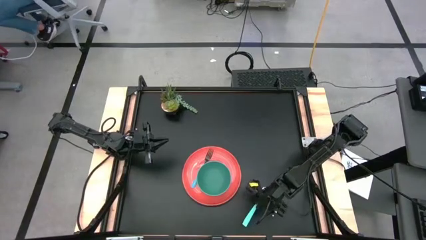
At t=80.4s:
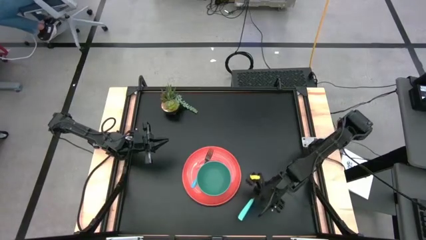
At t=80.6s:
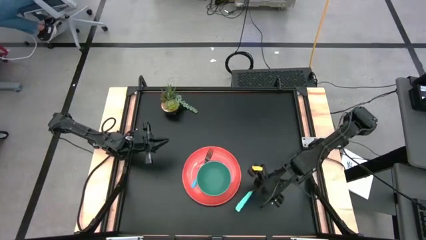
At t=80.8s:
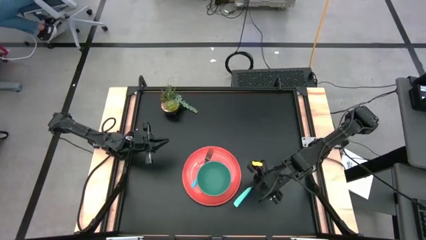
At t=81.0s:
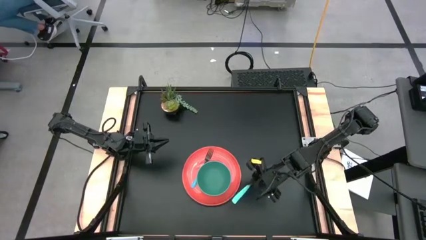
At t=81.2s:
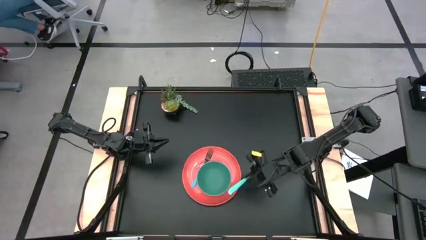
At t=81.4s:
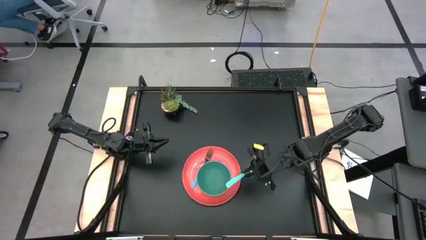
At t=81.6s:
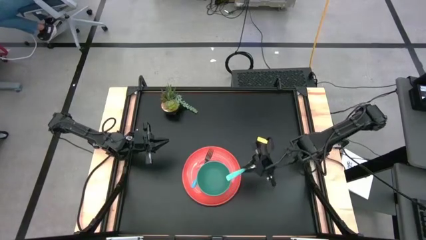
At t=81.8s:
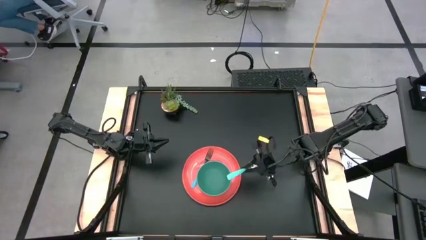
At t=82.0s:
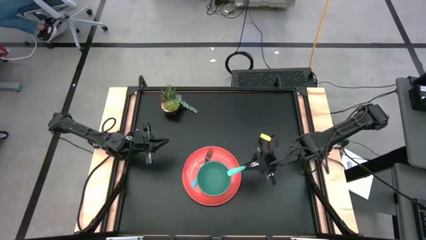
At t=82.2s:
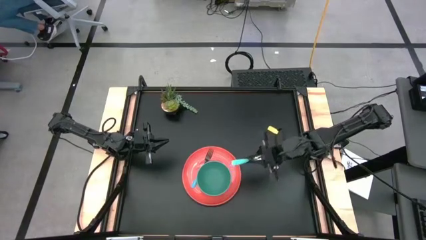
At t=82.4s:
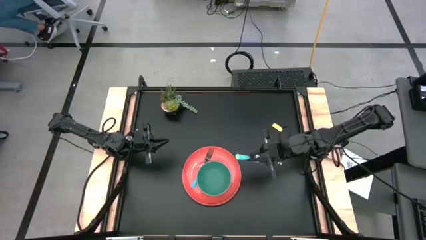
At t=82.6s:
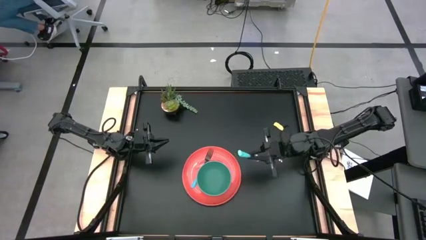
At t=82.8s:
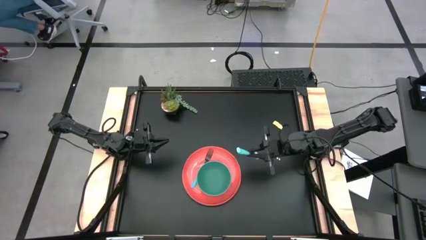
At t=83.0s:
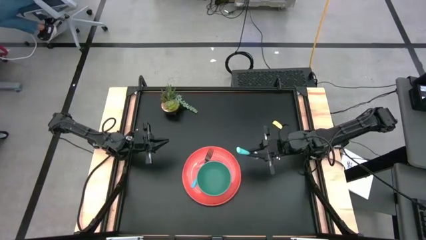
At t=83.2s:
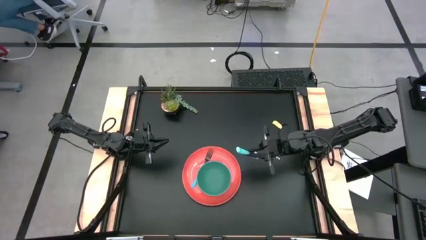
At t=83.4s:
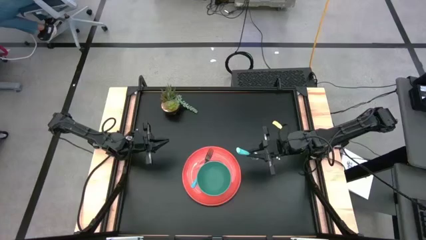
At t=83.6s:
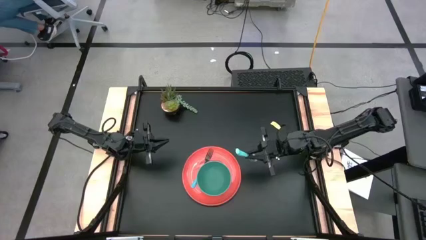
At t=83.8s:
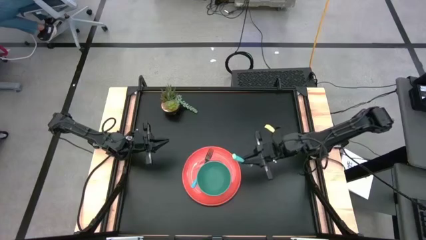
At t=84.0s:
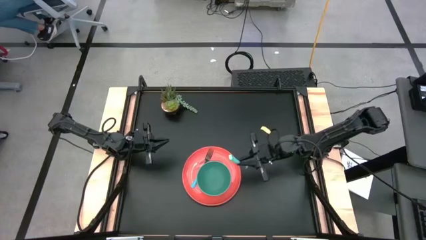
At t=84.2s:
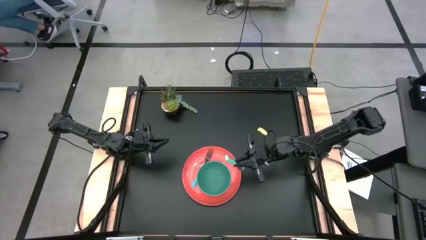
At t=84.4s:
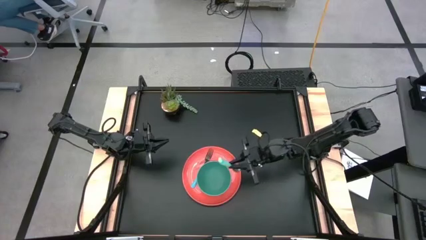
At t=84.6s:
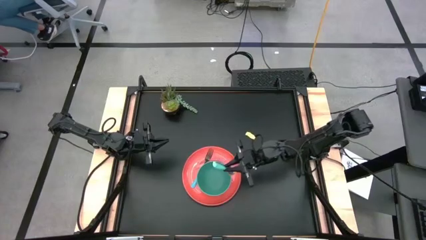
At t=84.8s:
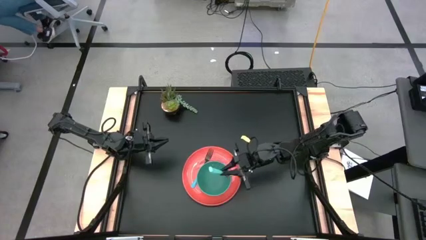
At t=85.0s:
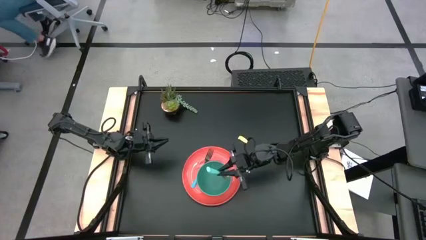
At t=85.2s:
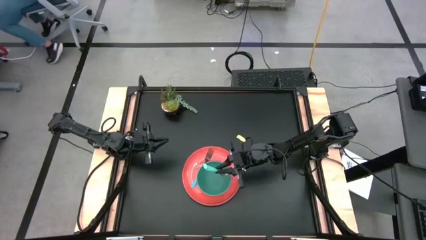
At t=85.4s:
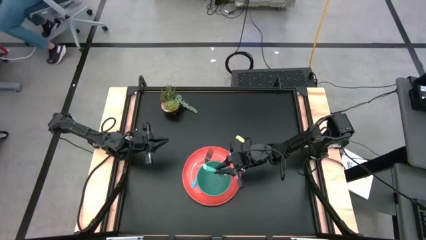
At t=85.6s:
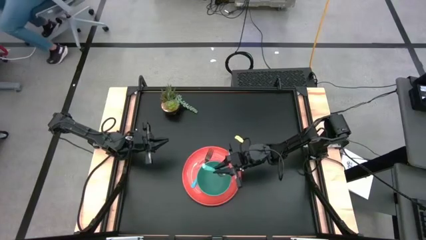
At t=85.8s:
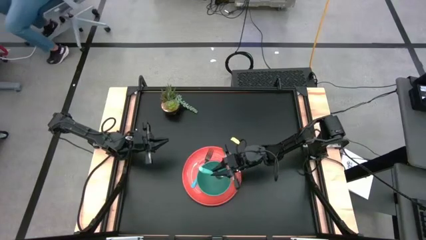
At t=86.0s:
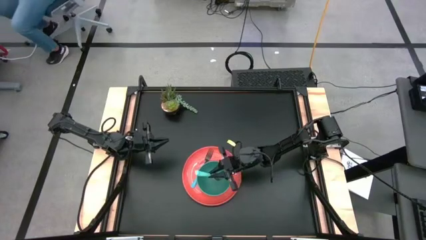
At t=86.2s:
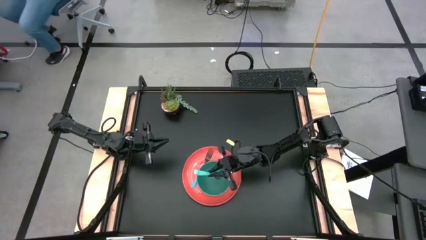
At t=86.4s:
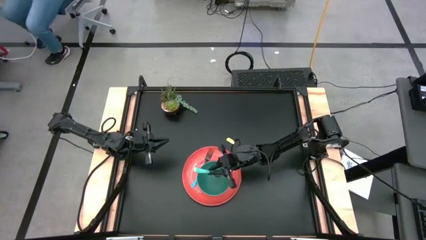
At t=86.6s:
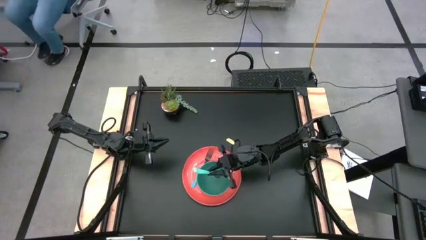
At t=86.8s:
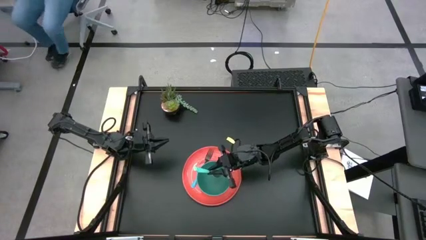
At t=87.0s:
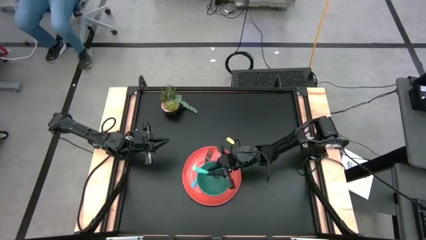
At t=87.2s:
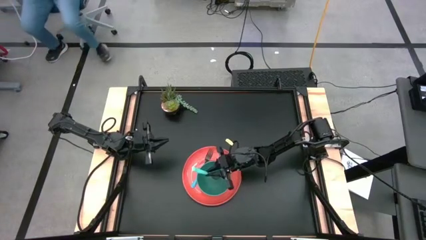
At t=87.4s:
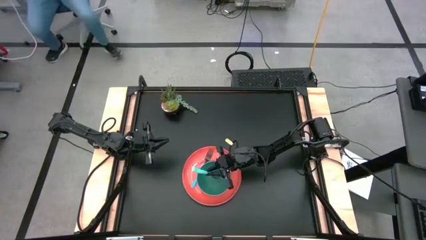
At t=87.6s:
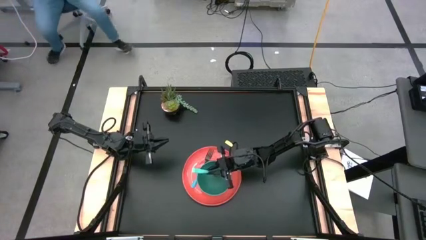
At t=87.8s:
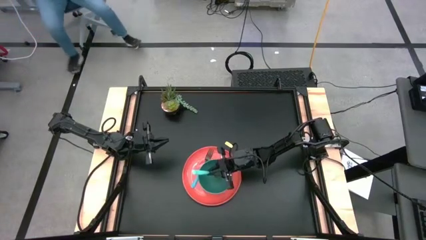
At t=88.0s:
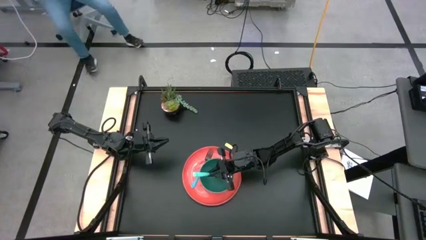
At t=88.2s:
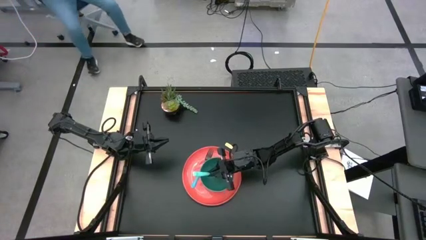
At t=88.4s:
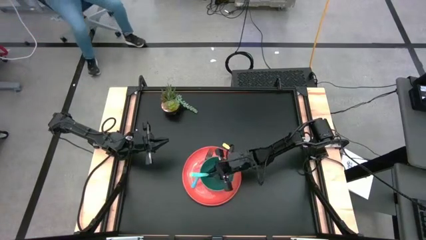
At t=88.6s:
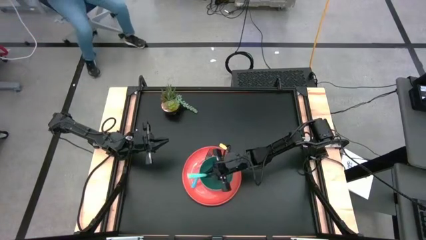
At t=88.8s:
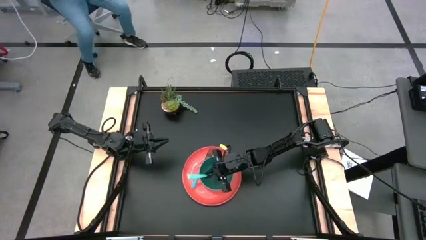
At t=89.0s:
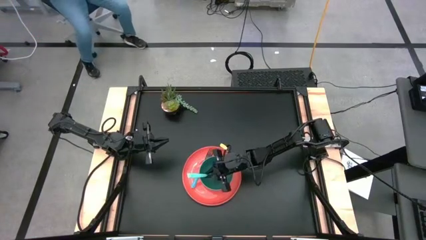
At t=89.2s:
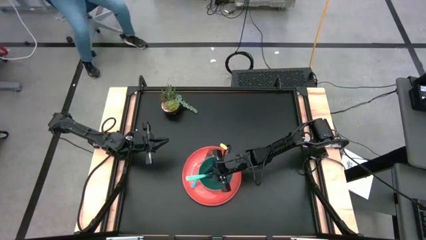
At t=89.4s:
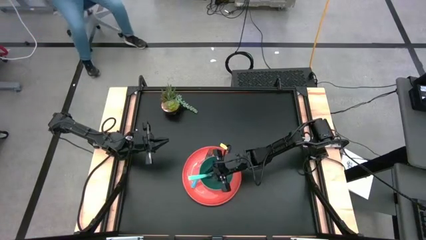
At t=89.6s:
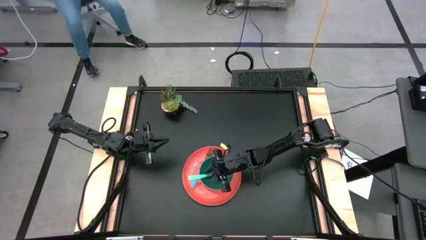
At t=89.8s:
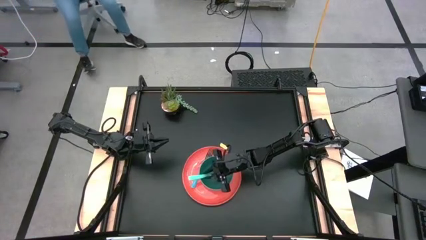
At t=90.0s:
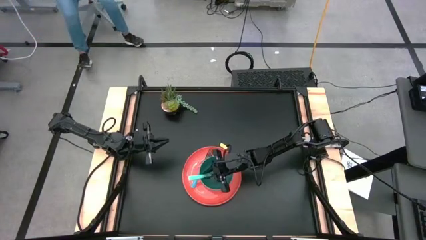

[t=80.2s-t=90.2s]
Task: Set table place
Put the blue spoon into the green bowl

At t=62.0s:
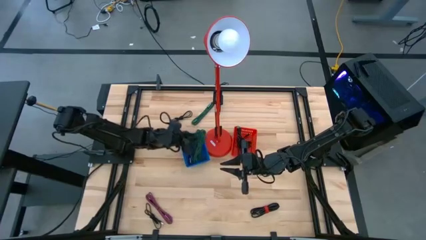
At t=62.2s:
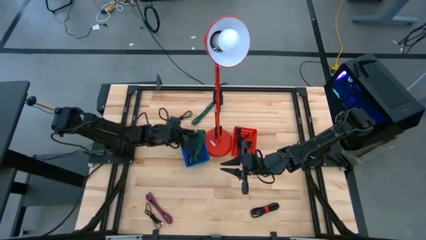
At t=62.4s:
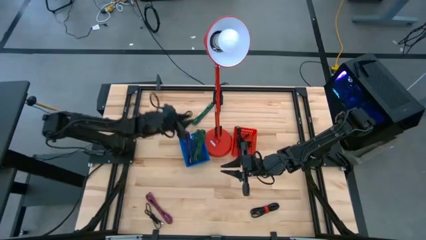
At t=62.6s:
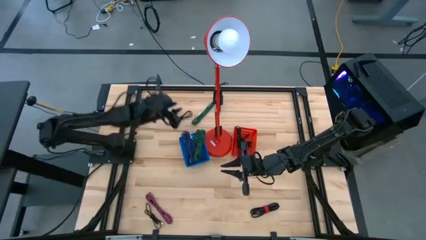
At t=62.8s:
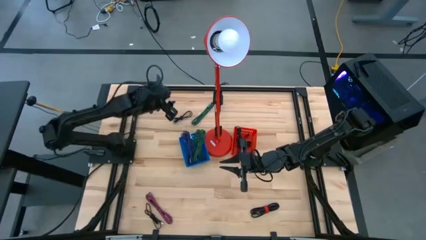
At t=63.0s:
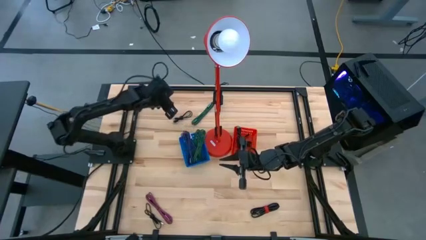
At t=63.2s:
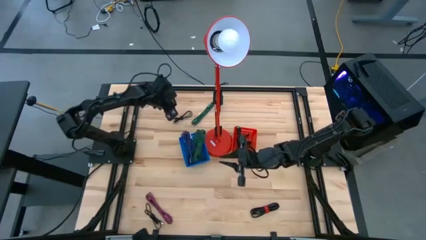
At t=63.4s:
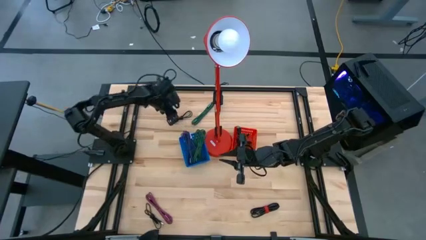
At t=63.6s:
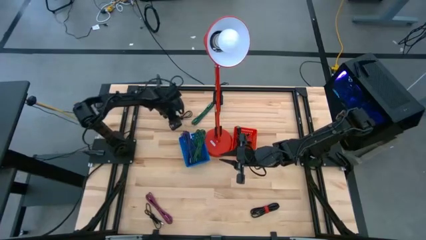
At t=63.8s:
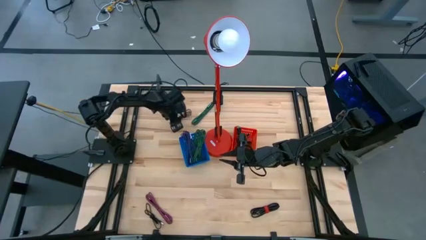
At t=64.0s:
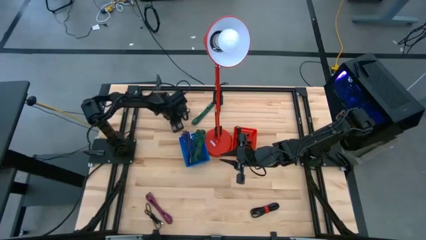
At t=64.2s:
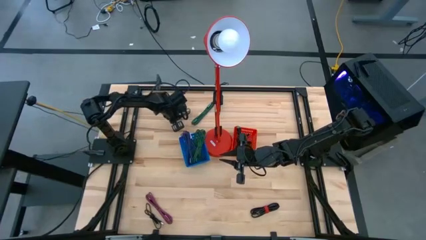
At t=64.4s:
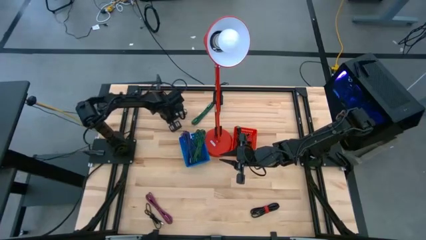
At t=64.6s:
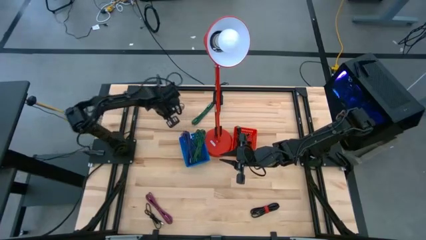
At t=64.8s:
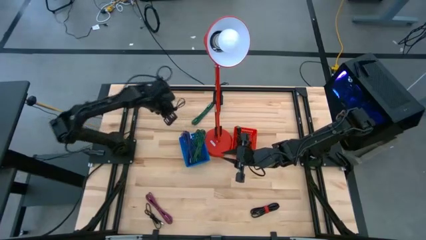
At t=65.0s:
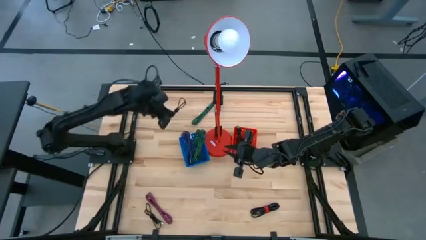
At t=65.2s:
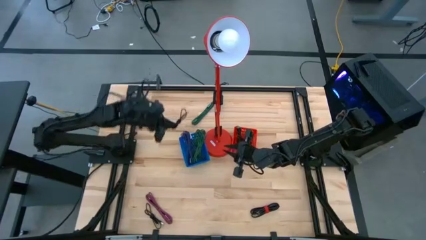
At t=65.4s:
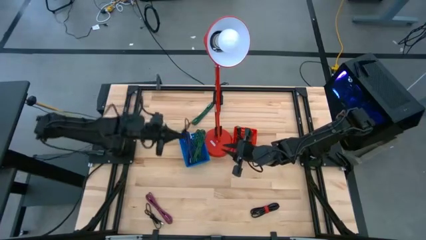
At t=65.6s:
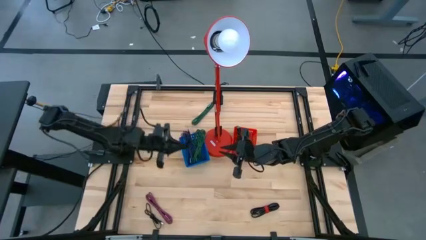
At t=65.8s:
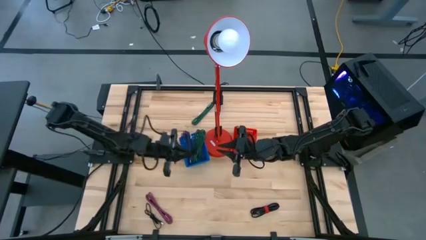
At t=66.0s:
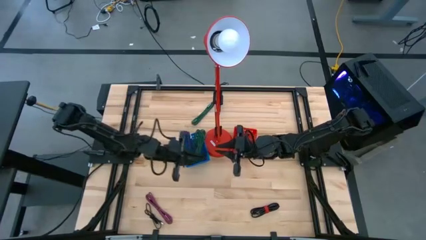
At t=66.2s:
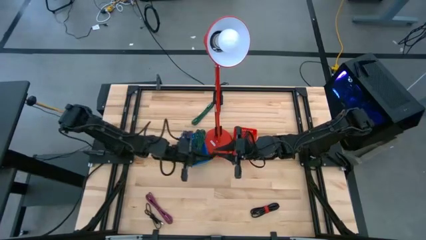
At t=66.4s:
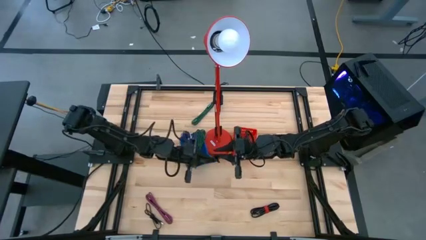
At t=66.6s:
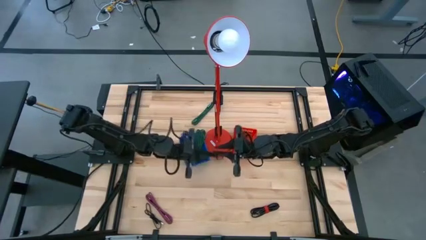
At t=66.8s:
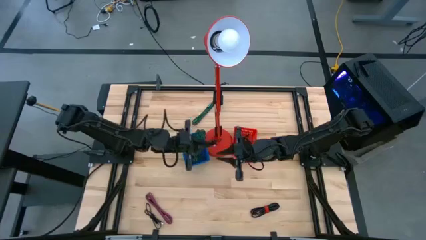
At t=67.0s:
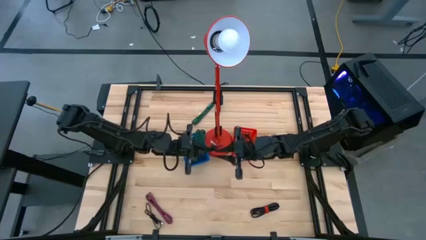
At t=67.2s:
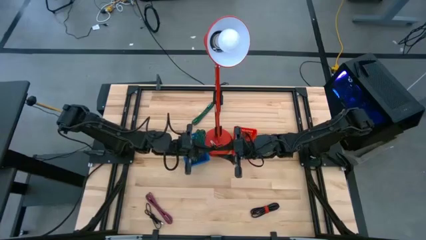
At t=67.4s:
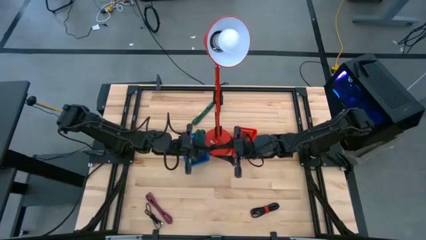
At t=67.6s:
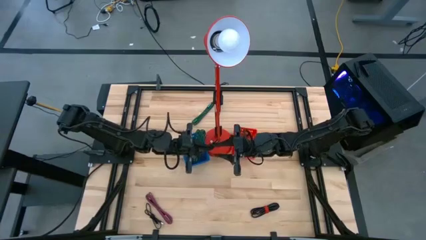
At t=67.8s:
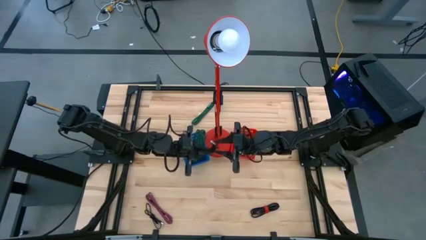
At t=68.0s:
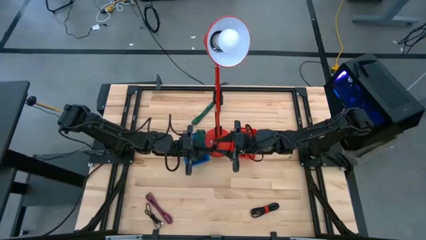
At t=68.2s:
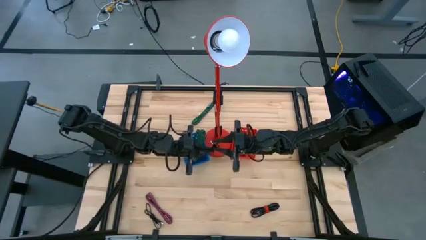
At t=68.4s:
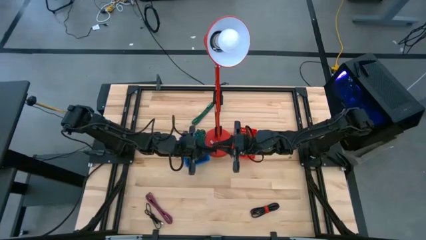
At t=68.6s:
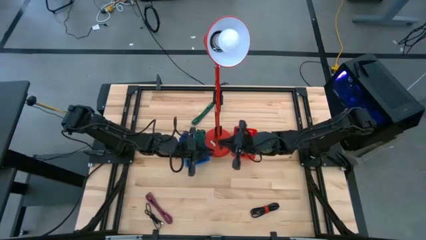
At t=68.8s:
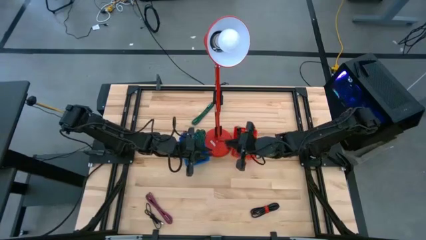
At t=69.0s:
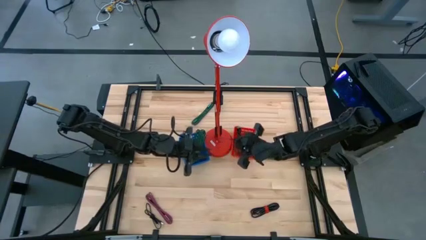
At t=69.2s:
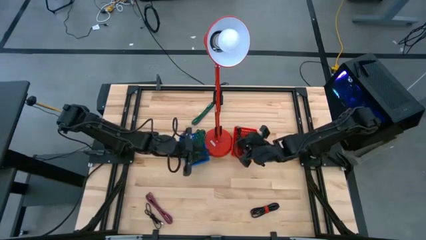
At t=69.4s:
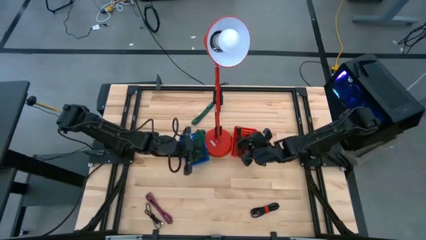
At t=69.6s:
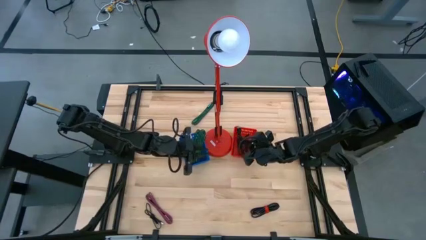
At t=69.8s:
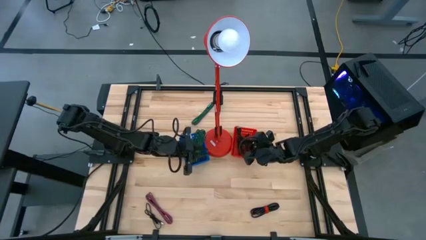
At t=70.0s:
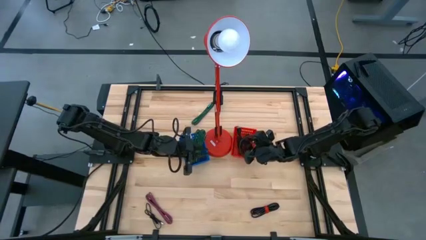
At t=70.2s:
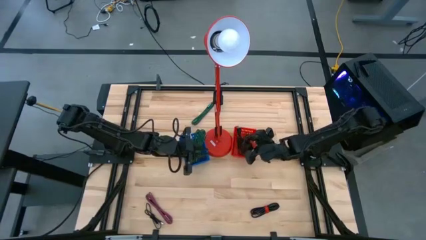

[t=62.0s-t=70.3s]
Task: Pick & Place USB Port
Put the black charger cable into the orange bin
